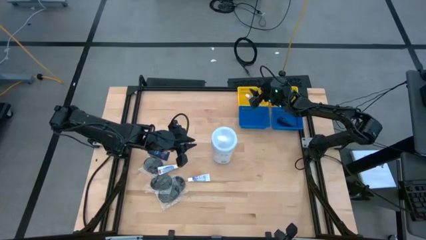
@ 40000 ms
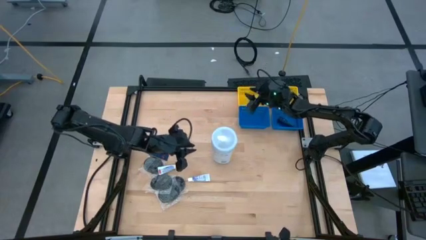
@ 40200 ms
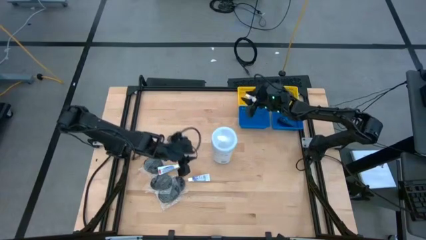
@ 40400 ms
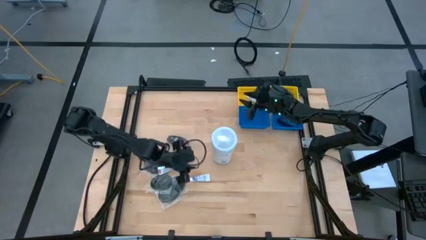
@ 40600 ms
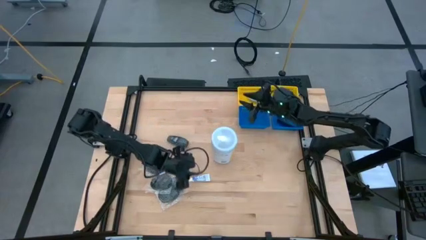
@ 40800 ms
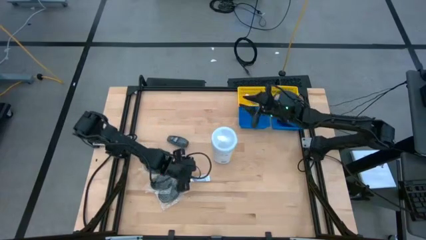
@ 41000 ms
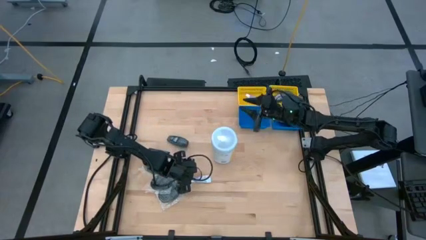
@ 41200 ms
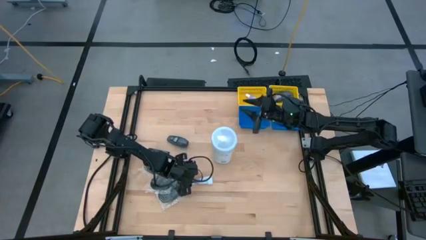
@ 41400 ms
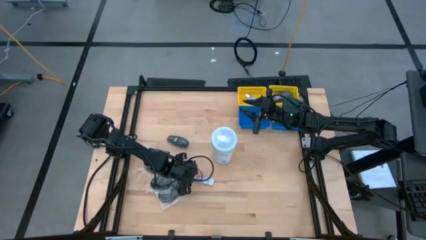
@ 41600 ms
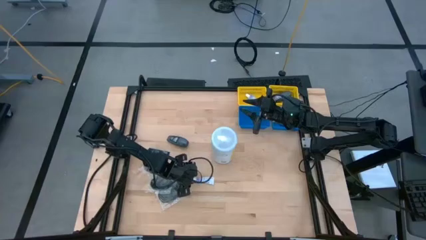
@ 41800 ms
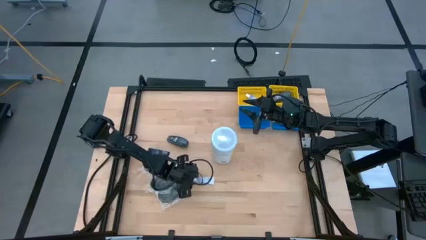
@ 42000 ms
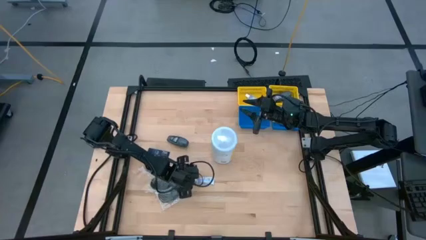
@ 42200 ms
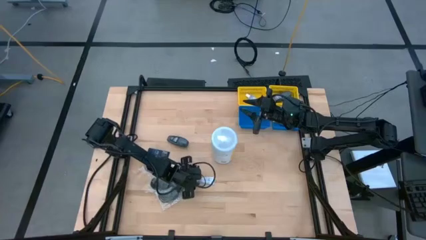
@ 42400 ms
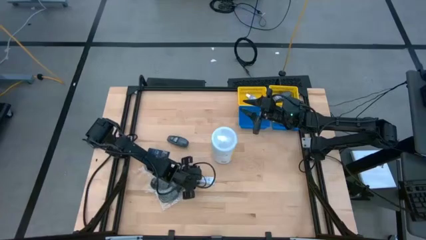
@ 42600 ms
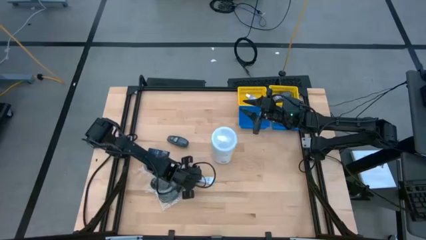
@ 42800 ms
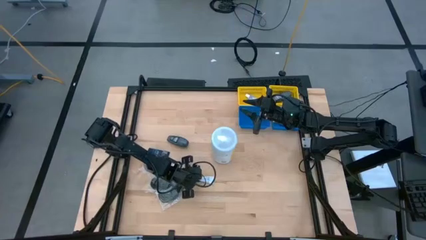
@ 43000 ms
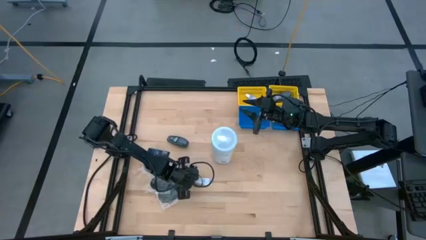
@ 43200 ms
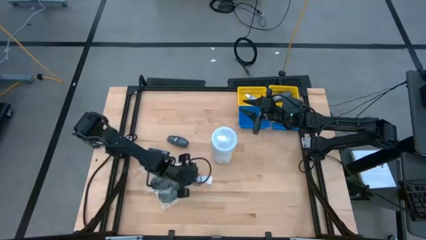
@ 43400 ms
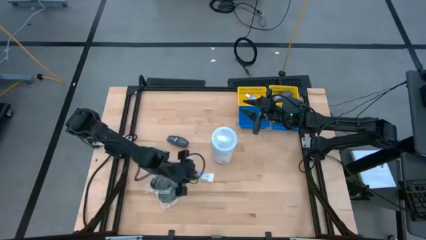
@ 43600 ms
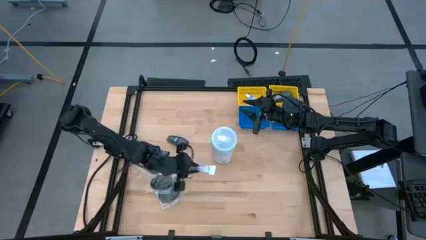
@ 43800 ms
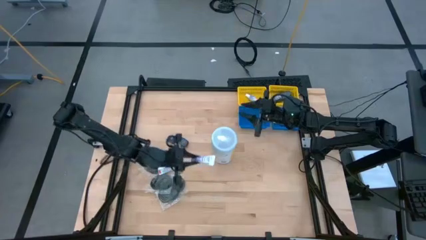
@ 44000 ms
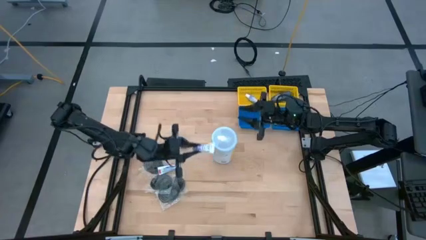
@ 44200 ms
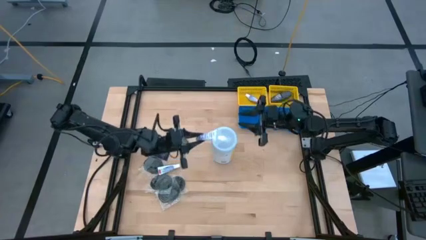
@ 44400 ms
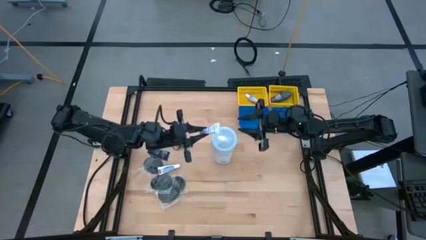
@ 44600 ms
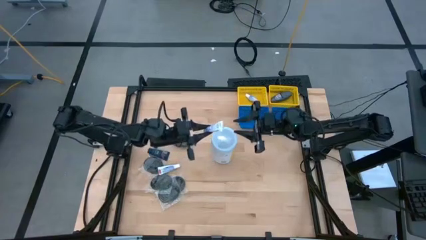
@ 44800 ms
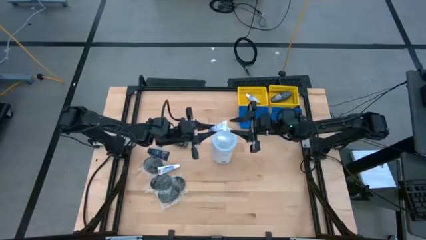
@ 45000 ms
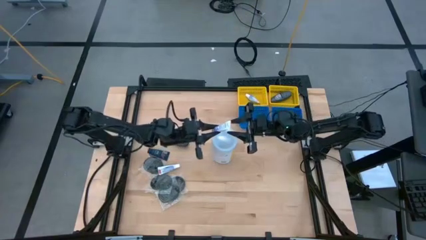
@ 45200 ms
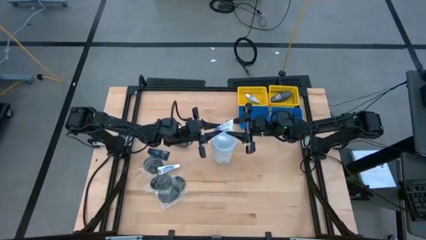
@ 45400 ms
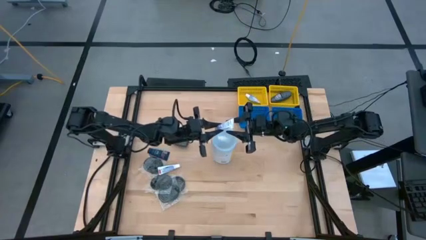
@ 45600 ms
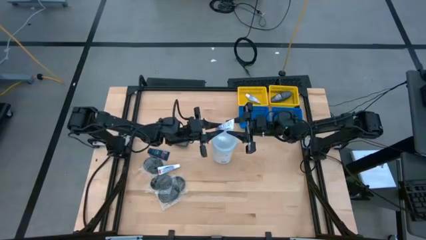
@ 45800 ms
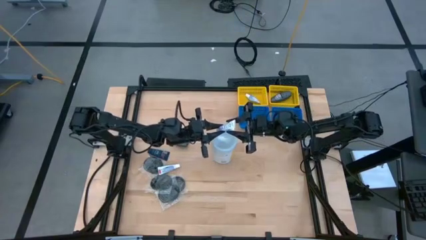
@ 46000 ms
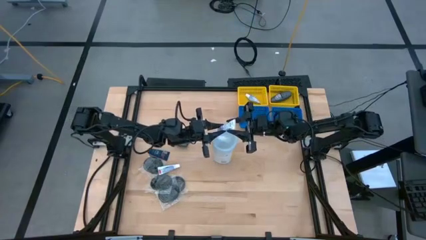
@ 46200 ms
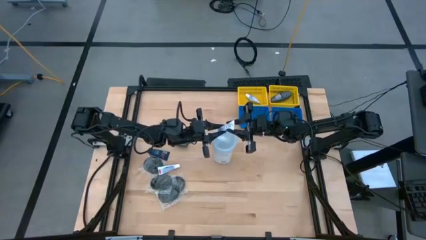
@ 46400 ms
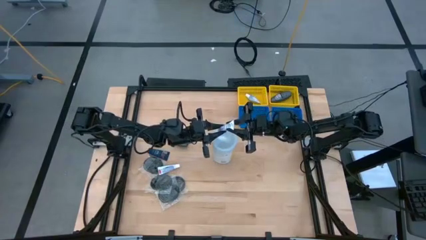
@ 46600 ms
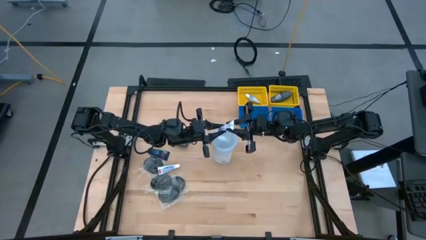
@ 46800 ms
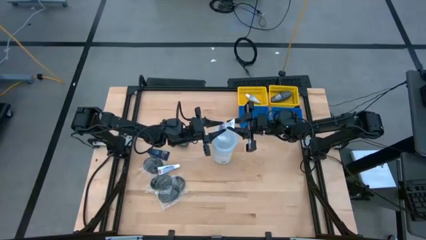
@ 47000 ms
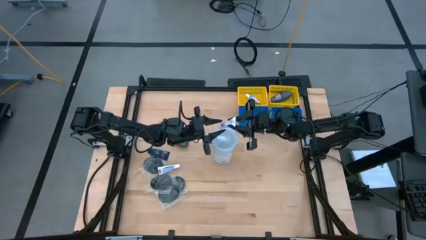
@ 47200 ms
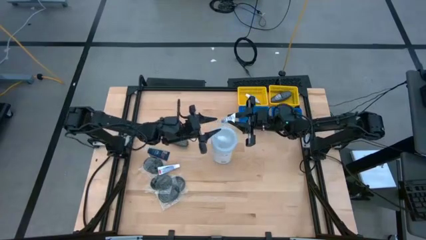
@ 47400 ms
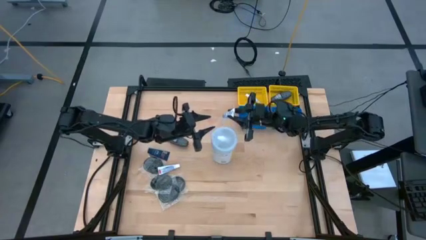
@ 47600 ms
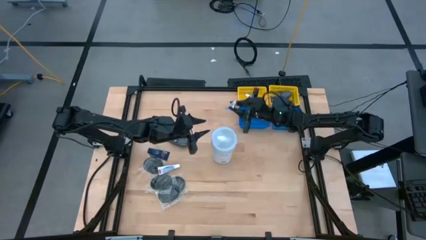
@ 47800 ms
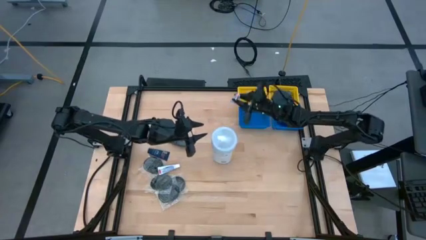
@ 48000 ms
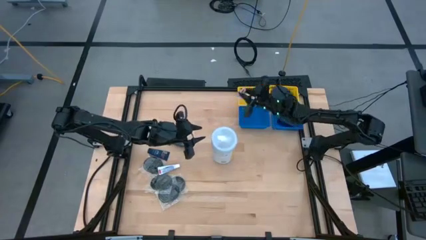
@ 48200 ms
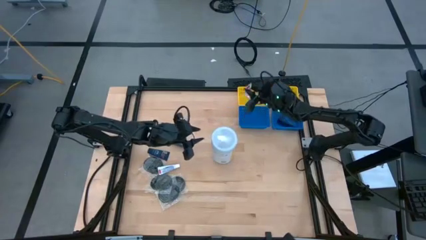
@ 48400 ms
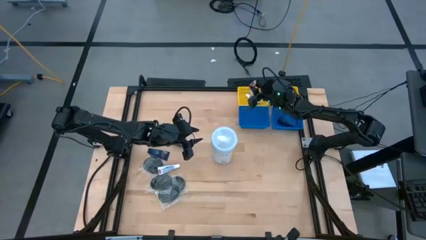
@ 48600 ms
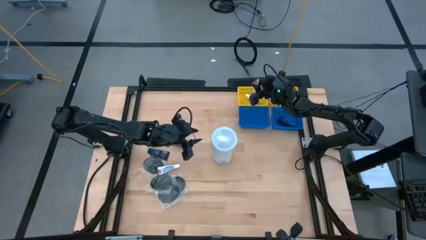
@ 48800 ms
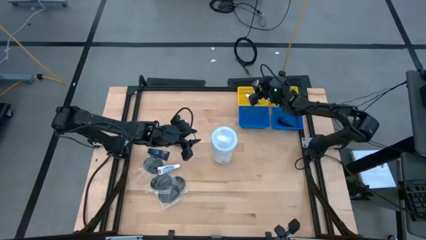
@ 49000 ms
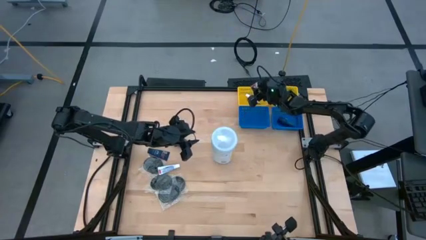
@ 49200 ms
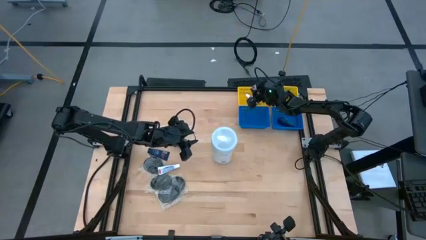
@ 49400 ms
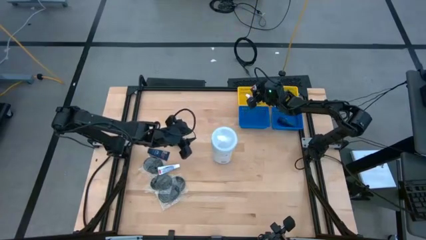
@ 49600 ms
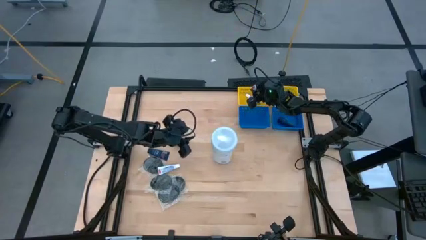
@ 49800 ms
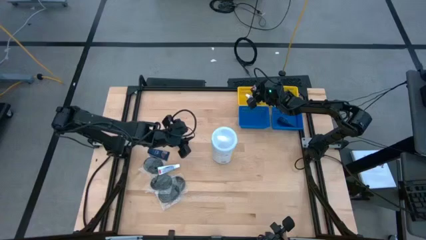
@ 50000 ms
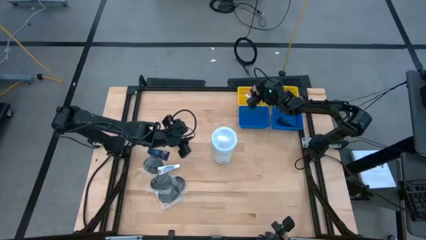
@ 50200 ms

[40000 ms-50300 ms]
Task: Pick & Place Travel size toiletries
Put the white toothpaste into the left yellow bin

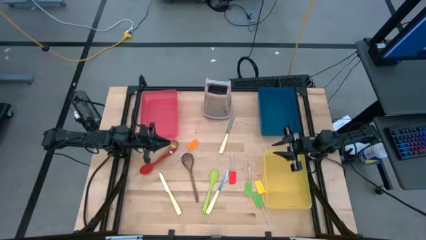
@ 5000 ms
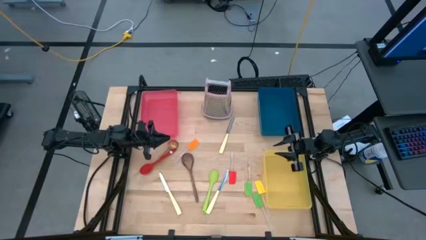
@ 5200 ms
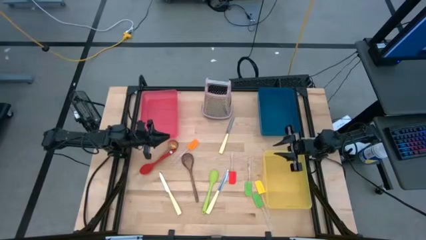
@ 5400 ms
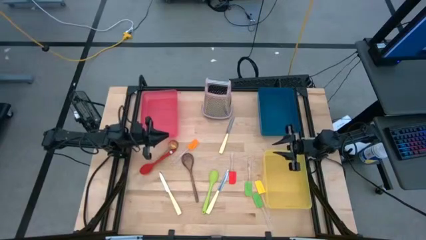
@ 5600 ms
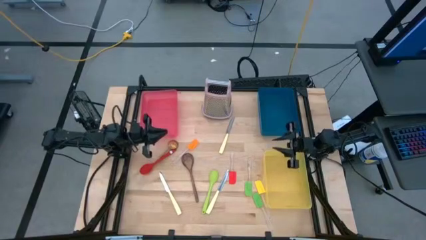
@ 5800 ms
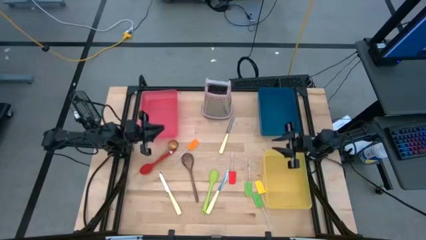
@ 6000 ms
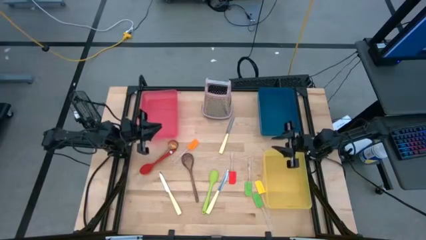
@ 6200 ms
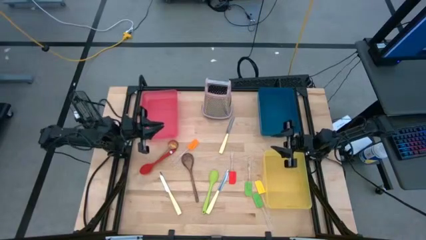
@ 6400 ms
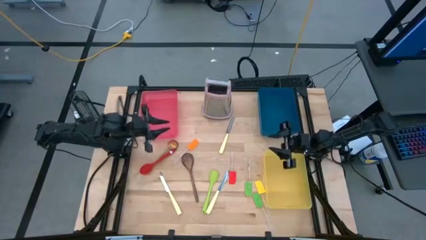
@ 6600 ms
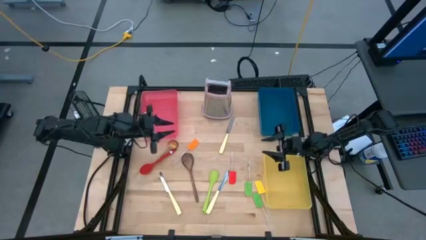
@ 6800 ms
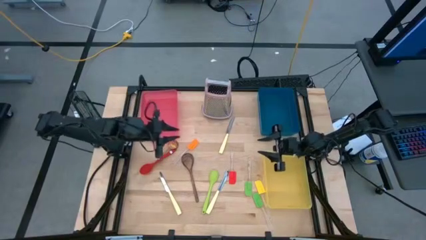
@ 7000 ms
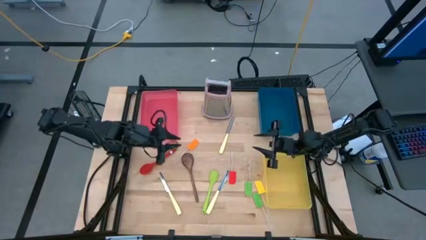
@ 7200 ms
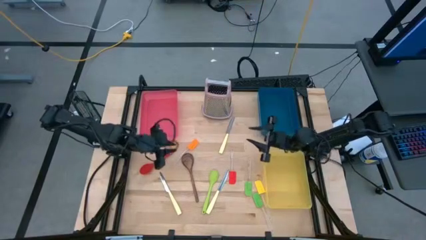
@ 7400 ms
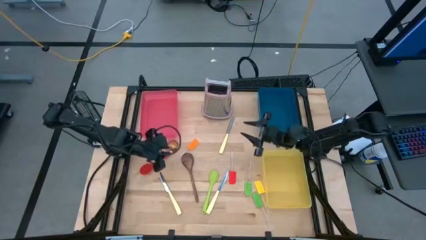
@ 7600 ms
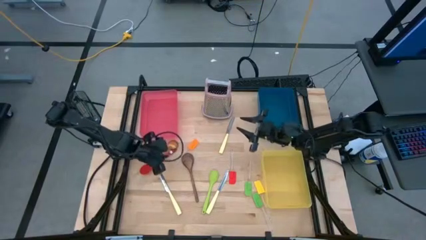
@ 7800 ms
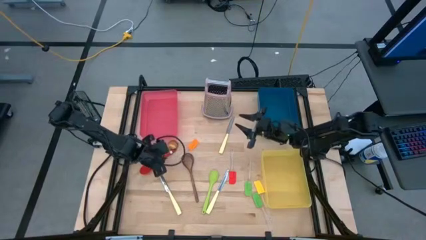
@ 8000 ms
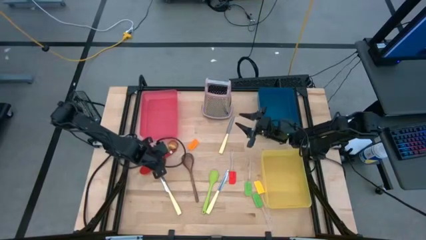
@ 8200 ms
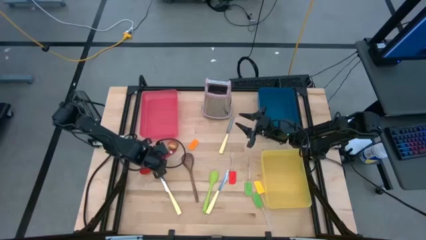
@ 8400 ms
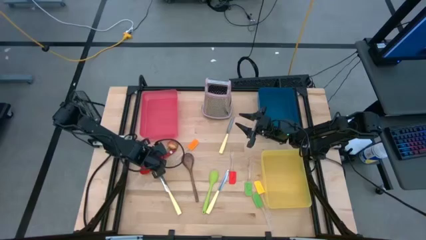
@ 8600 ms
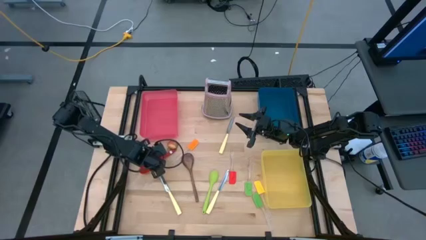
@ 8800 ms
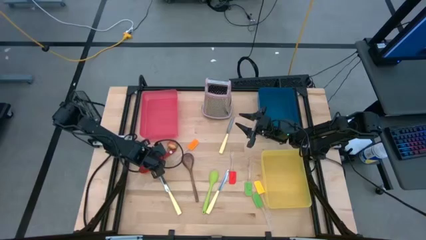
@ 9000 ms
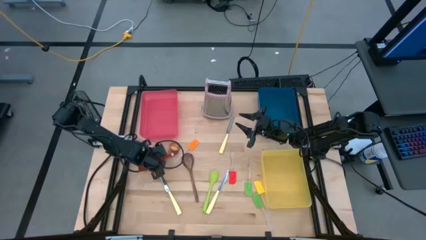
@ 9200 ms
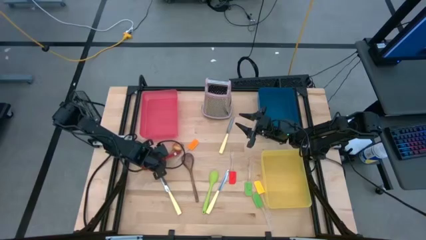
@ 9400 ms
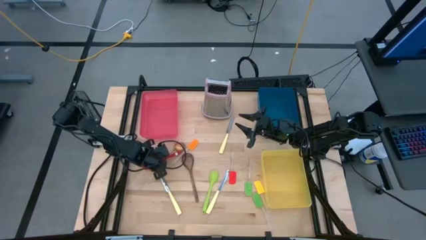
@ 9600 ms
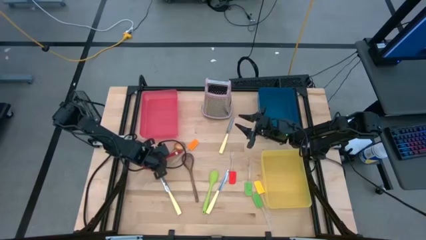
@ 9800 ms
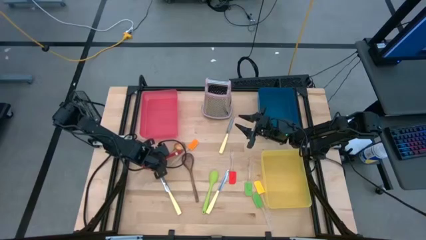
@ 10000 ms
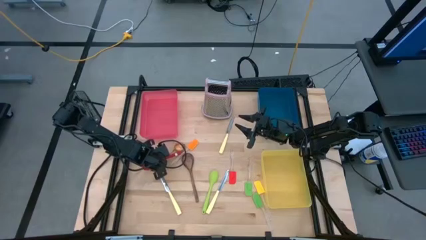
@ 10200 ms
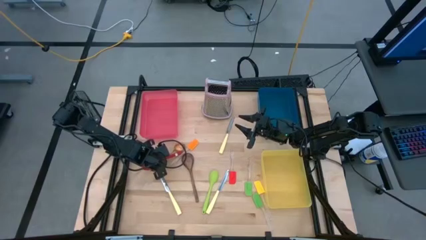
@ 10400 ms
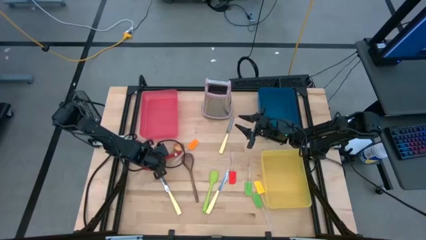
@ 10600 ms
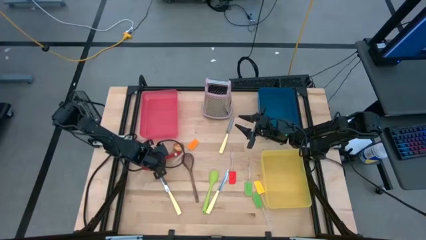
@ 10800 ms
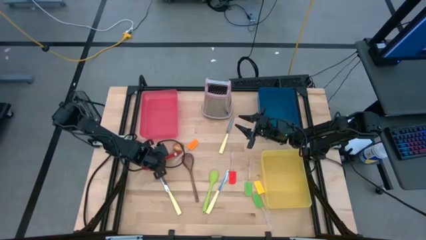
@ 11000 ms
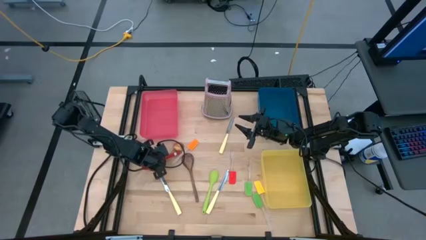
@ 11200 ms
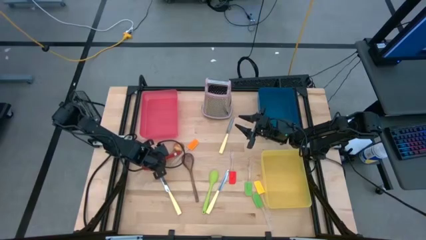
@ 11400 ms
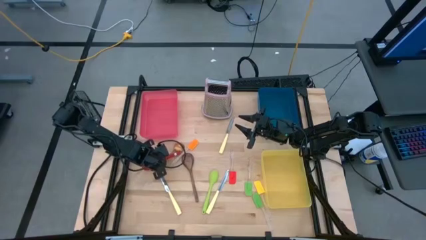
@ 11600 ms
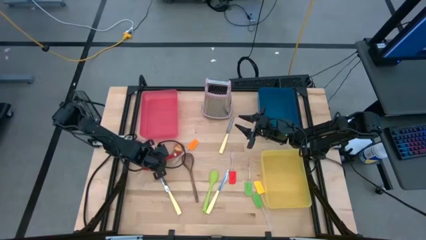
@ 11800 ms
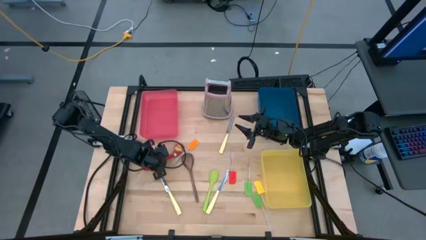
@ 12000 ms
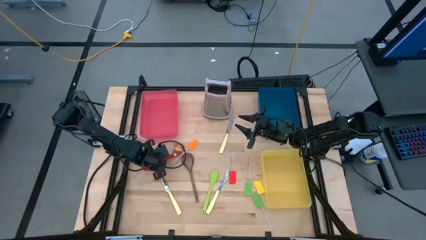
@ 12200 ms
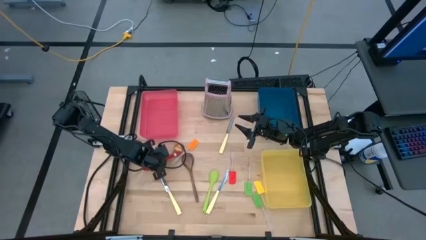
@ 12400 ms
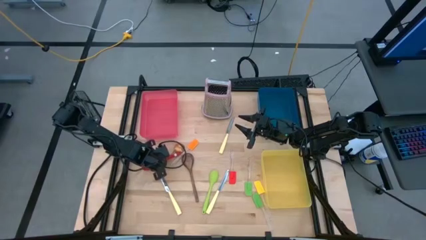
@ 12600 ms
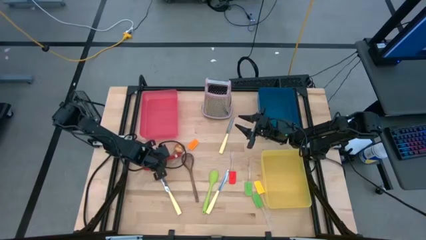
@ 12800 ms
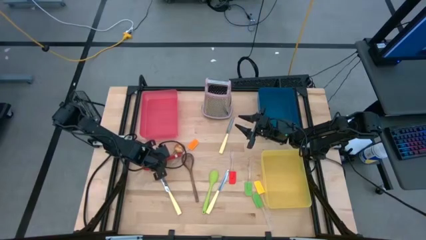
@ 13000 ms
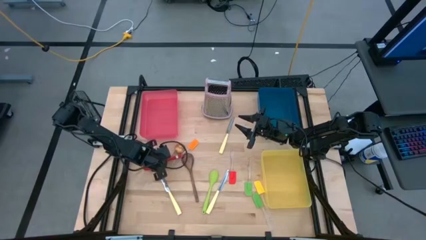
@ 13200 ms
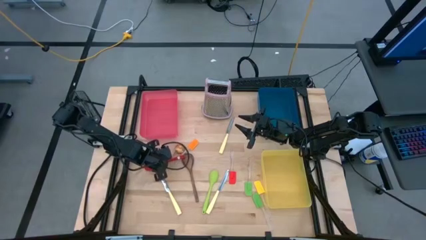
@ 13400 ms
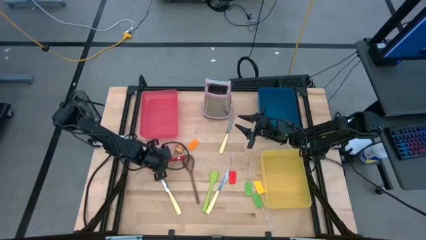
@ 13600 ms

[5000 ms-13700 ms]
Task: Pick & Place Kitchen Items
Put the red serving spoon into the pink bin
